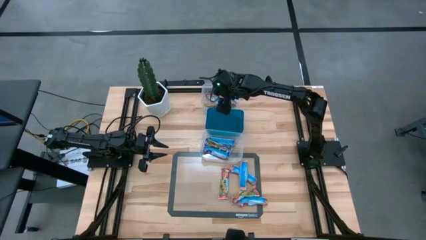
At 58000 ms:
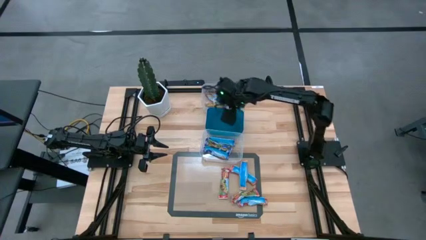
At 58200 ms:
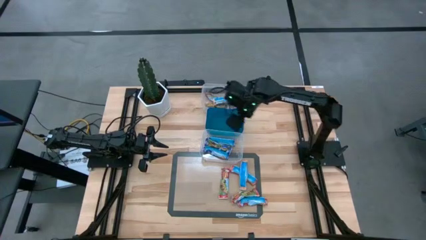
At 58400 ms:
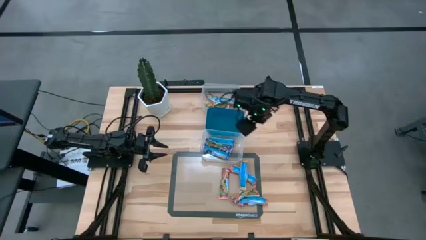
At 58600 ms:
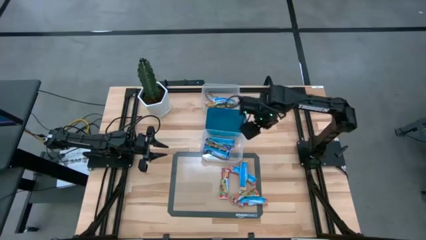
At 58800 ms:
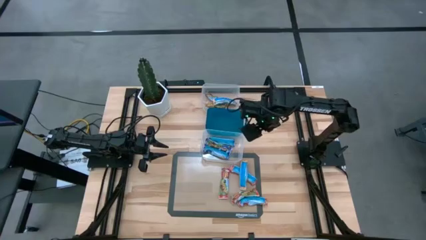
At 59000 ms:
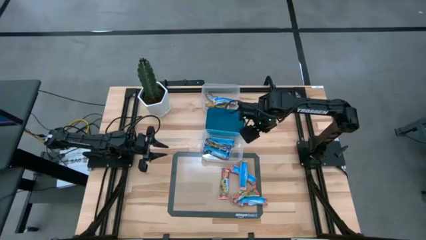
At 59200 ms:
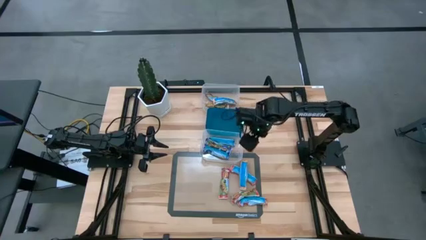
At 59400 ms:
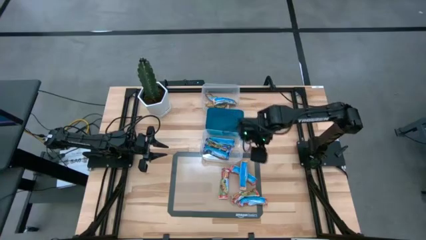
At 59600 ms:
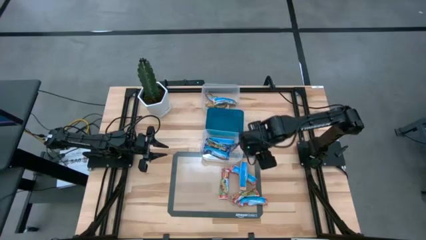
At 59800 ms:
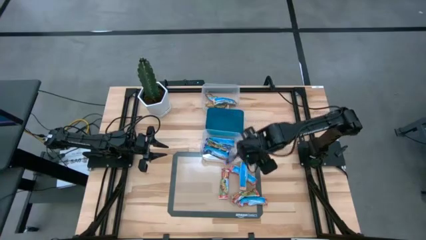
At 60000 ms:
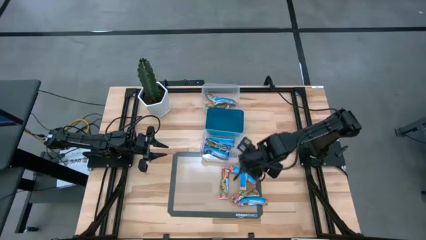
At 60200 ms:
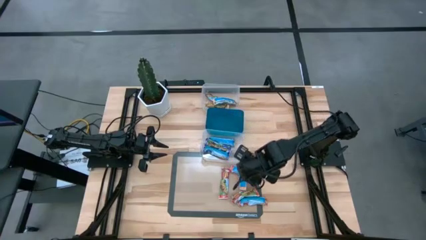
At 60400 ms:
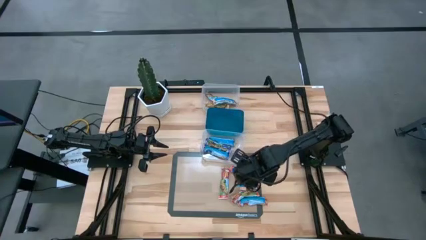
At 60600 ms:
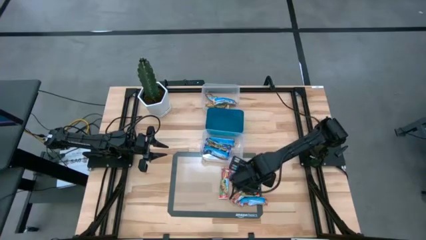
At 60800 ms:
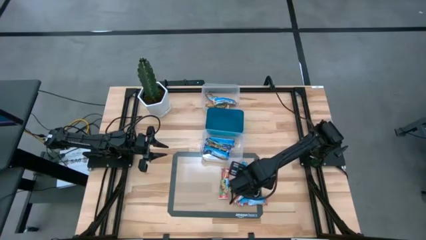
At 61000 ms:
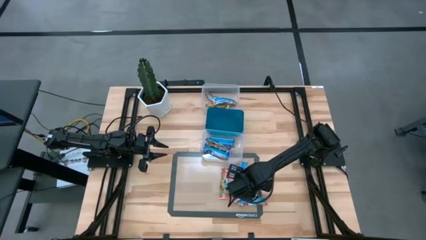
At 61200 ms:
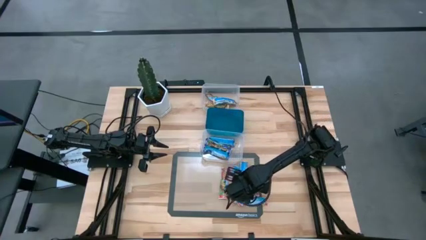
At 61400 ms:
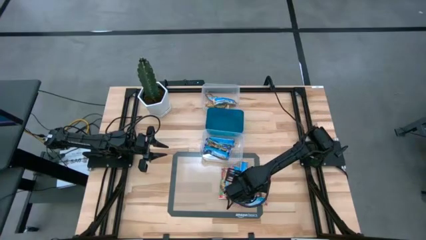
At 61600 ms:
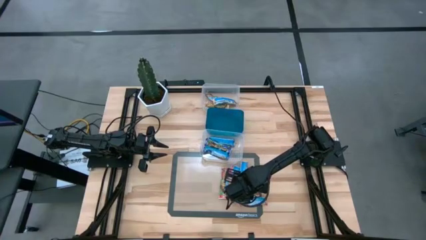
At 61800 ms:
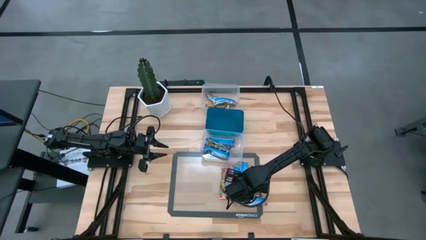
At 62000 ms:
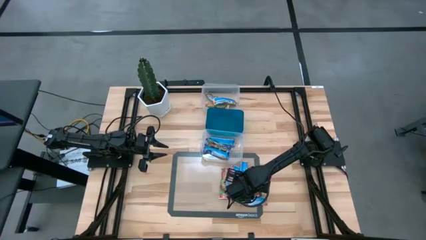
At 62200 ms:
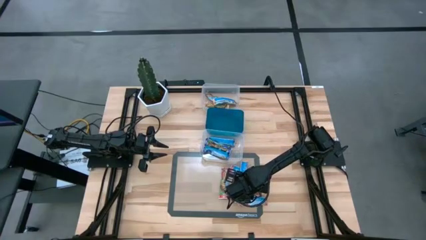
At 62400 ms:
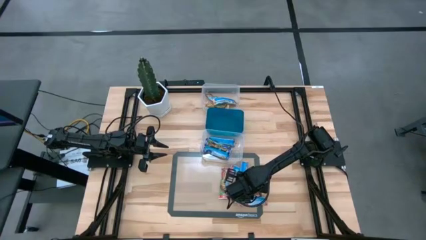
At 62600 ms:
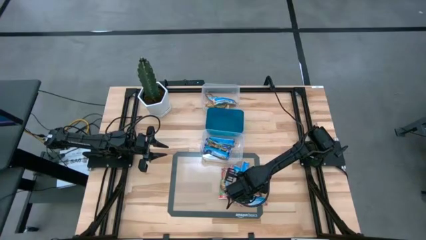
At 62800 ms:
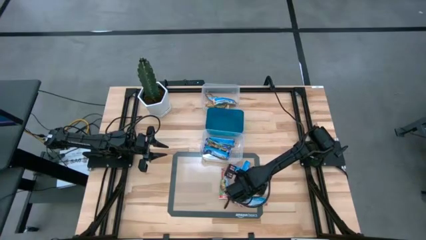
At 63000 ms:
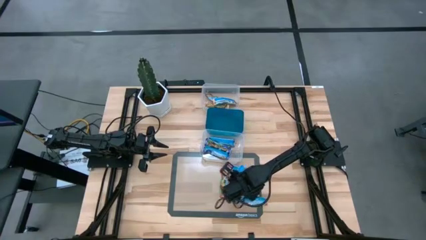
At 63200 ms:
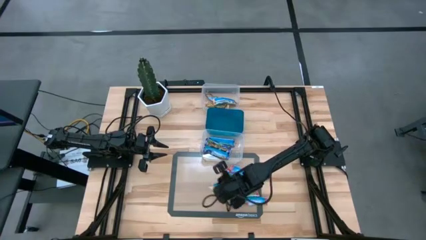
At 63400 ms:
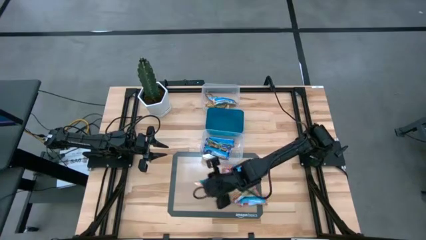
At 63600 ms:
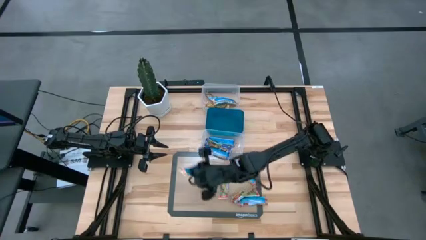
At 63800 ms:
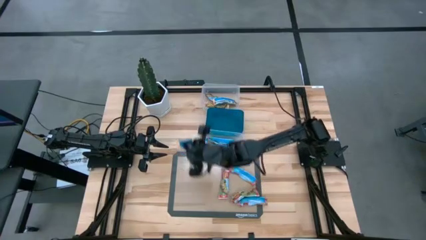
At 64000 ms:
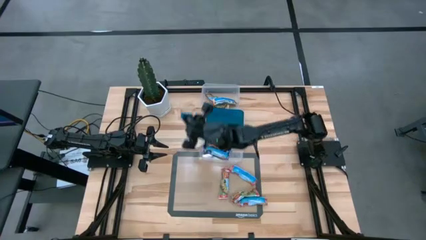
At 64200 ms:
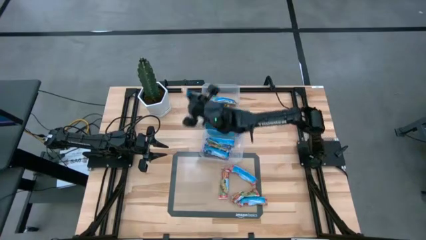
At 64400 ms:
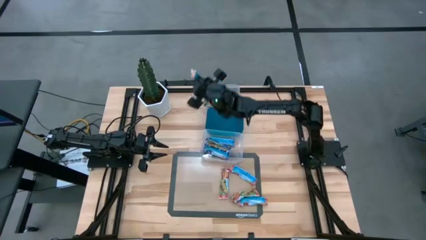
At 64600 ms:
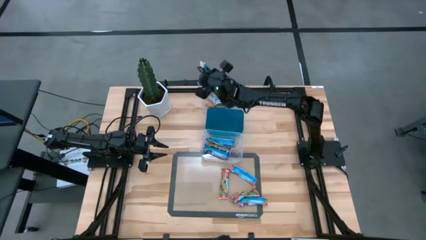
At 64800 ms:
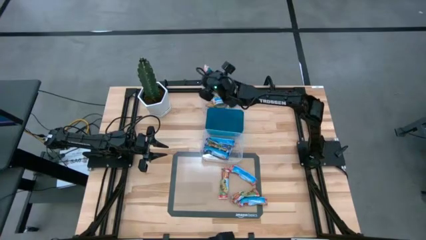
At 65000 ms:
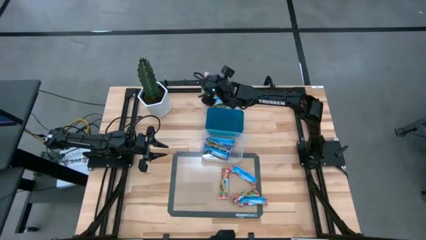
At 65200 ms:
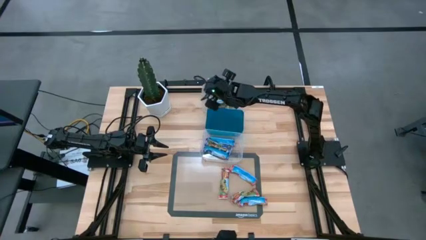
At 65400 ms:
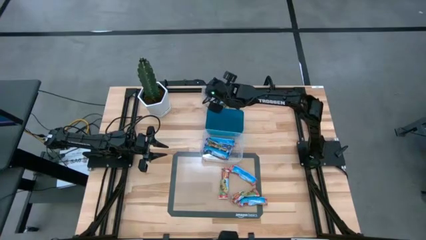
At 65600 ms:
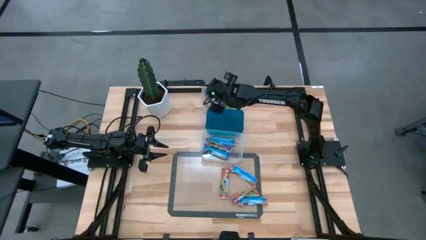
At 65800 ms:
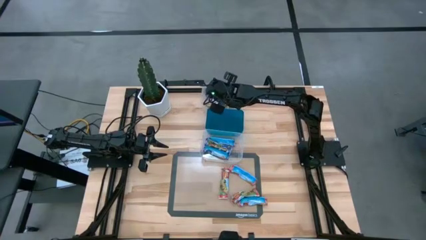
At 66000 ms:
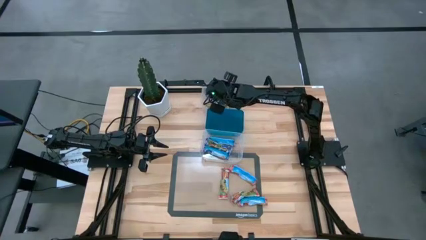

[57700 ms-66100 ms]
Task: Pick and place Granola Bars by type
Put the yellow granola bar into the top transparent bin

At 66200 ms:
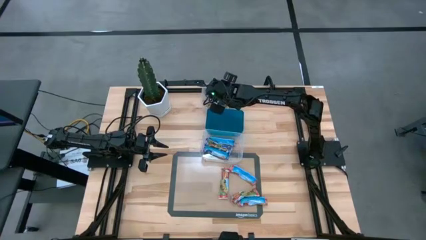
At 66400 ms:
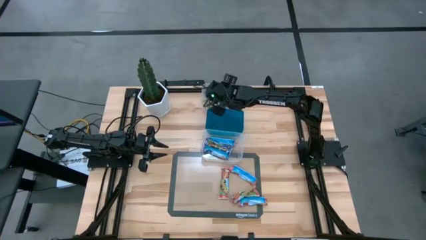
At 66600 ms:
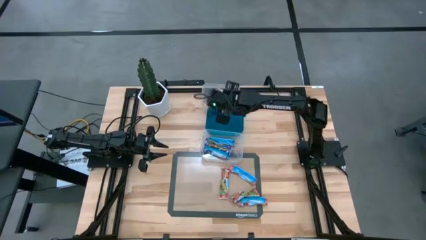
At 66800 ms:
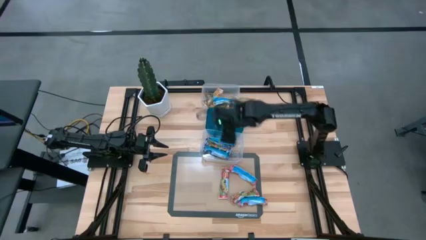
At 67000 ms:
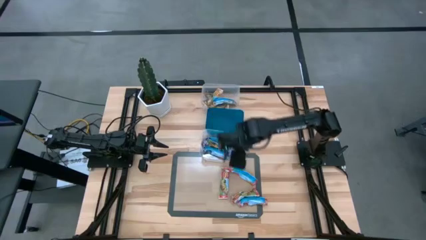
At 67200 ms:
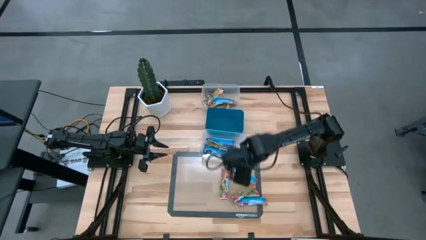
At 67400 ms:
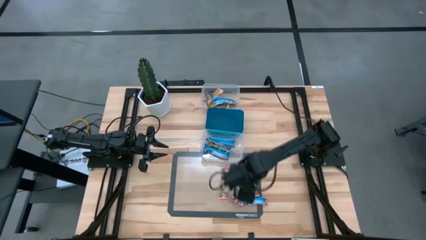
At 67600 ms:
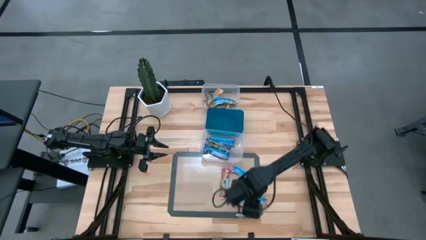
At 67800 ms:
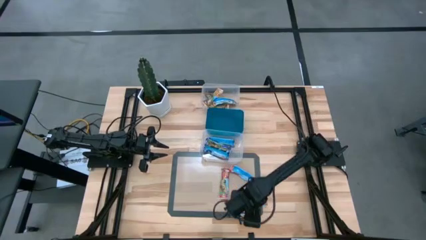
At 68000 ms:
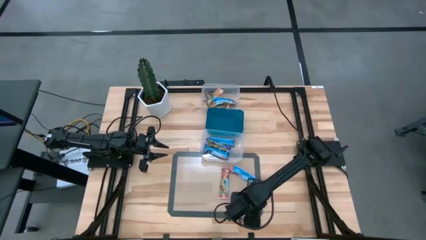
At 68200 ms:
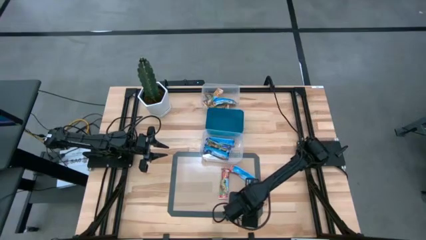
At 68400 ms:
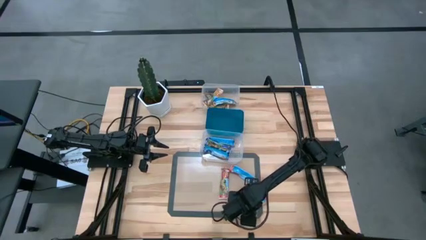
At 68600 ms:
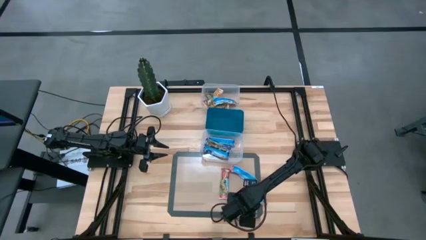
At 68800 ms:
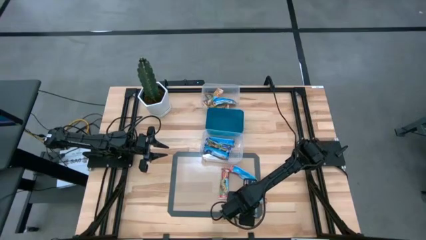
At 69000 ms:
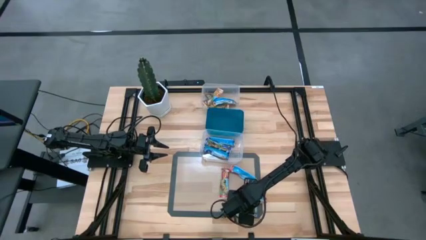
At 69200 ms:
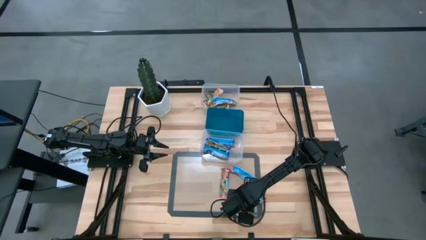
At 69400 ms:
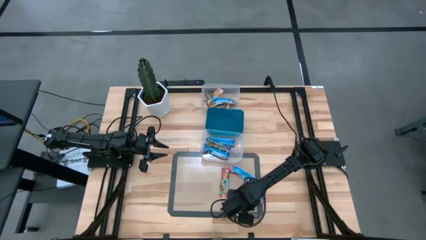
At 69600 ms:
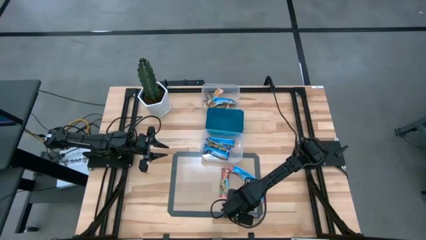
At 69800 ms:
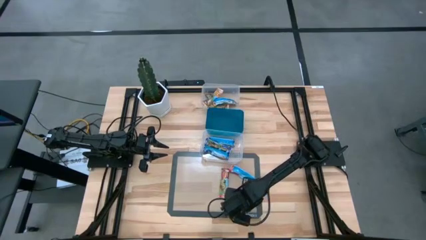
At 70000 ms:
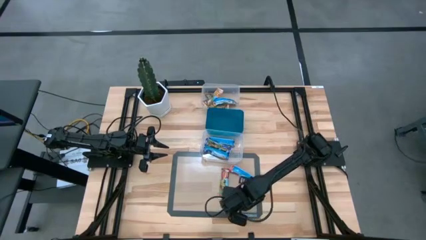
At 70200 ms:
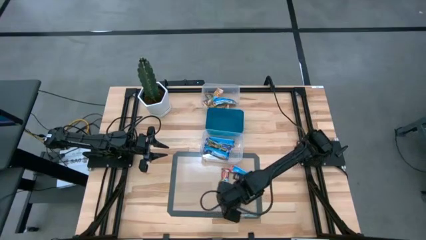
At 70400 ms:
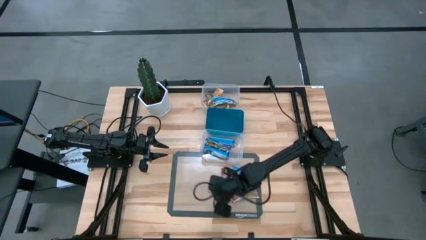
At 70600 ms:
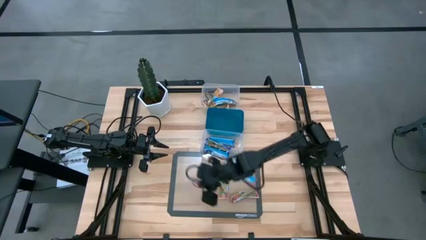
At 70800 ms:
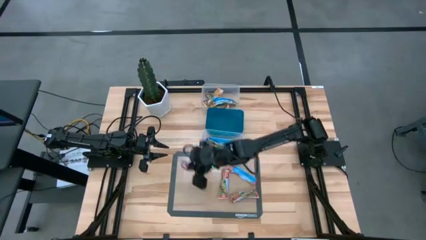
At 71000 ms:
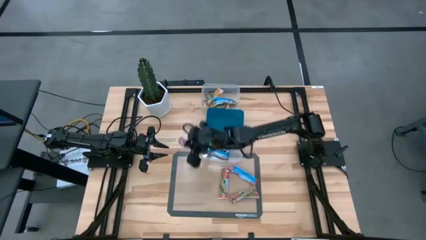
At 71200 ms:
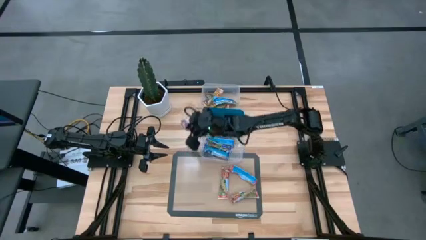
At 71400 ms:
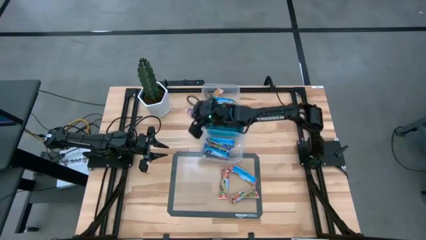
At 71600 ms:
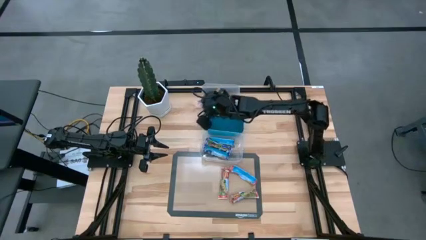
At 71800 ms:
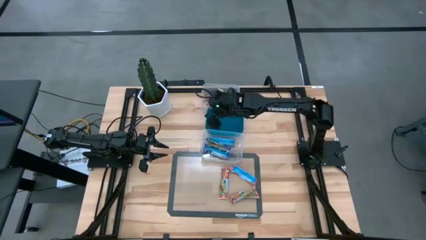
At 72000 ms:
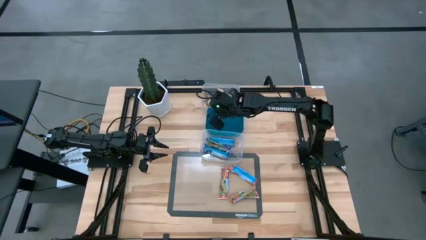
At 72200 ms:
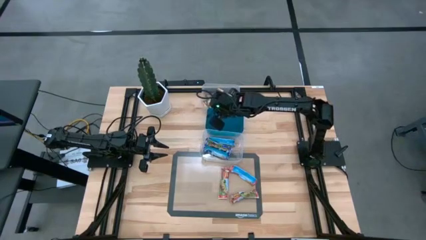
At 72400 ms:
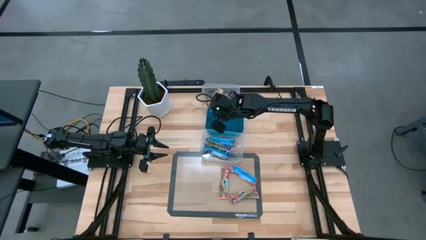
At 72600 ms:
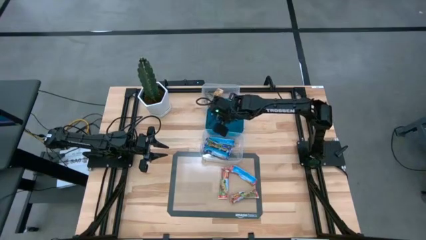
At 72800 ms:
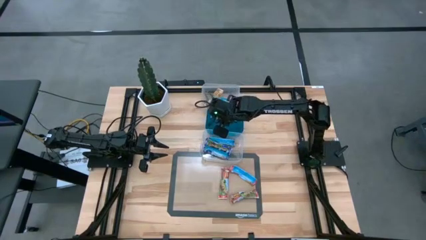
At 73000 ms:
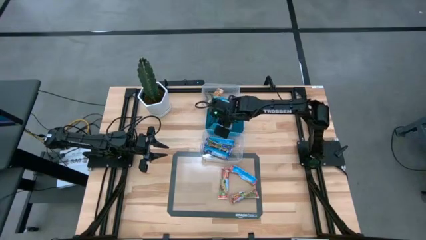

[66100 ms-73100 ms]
Put the red granola bar into the blue bin
